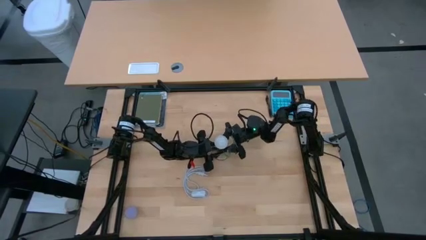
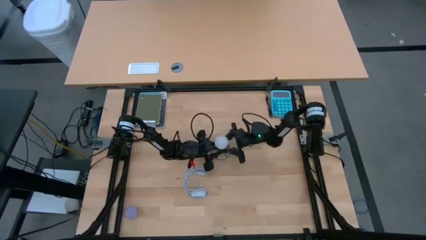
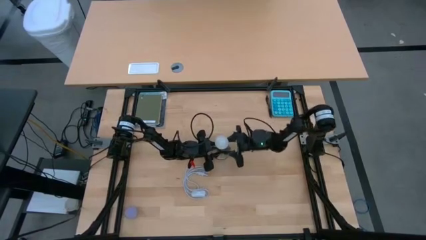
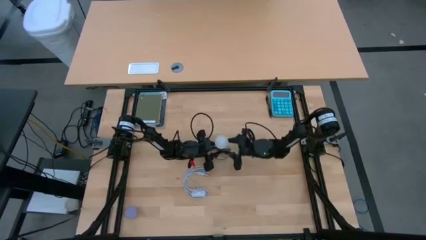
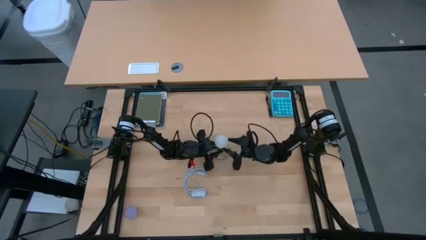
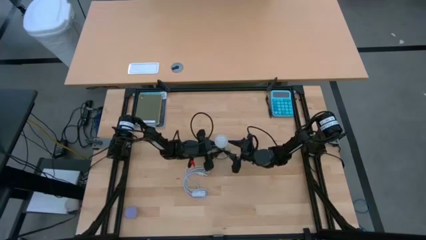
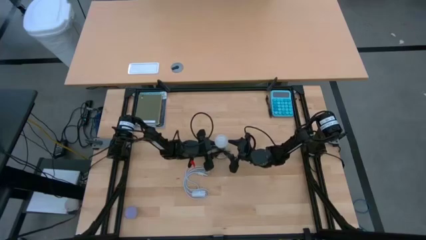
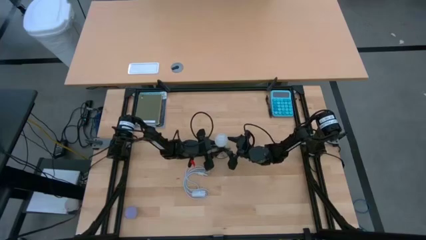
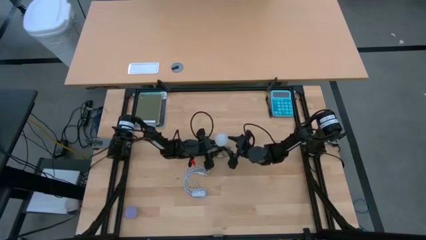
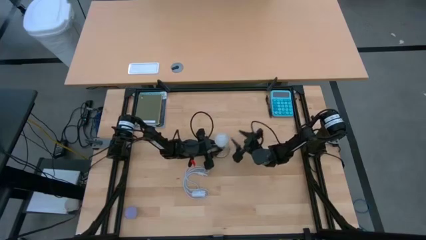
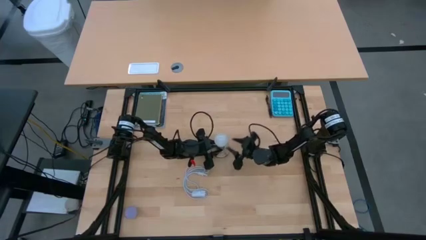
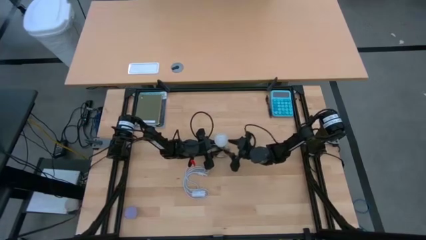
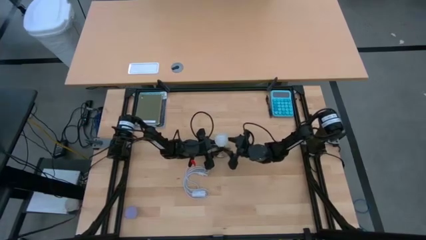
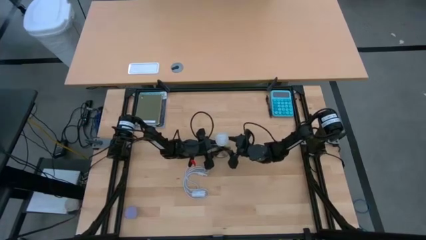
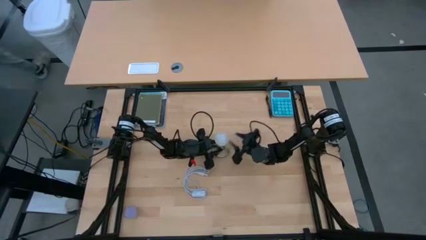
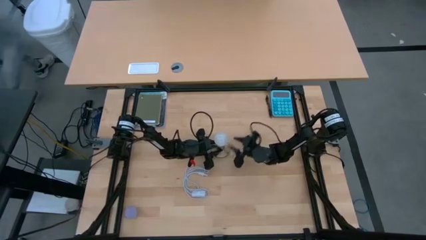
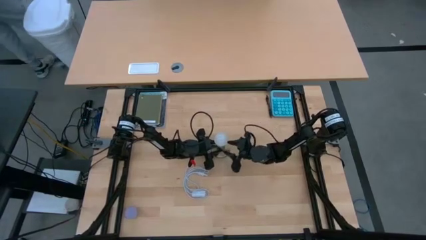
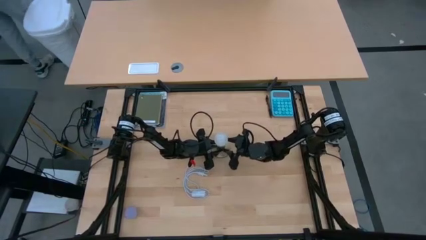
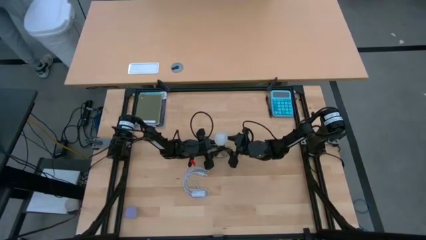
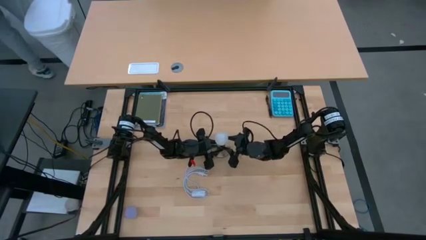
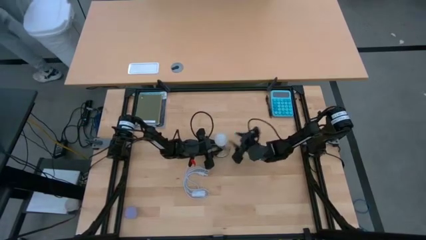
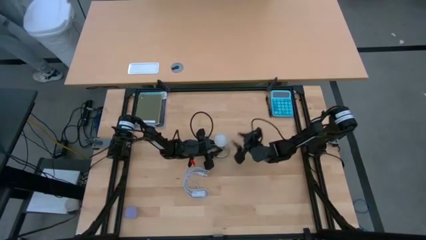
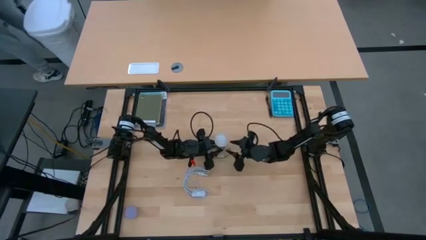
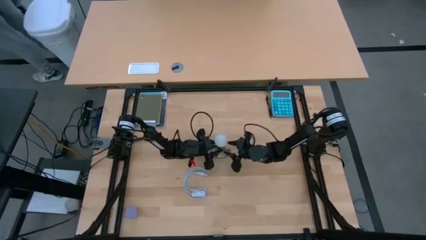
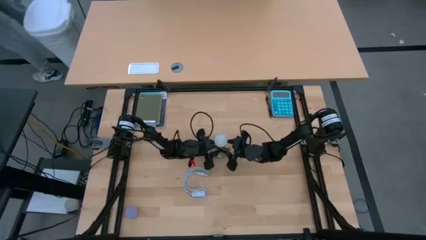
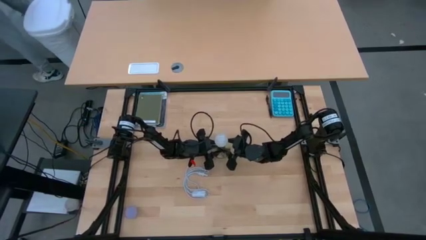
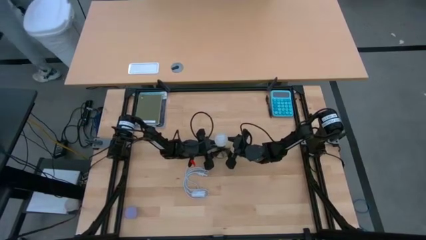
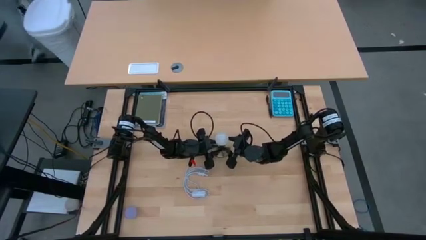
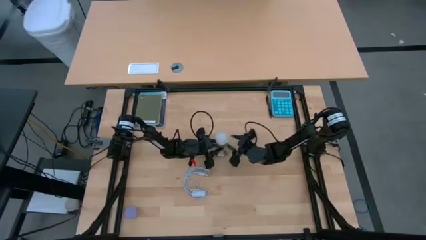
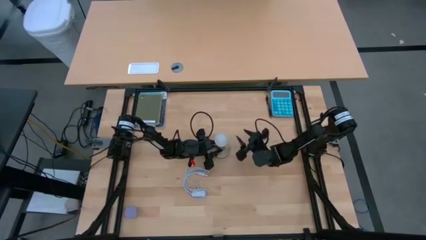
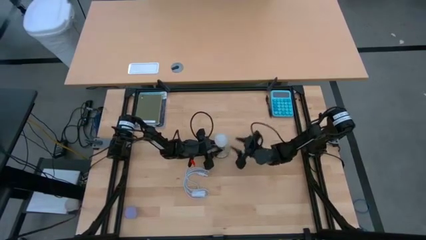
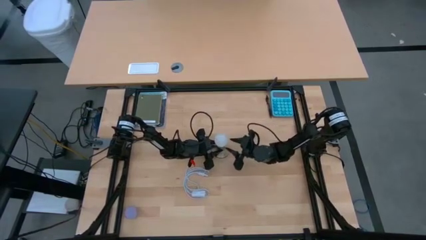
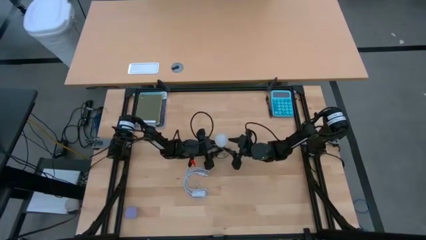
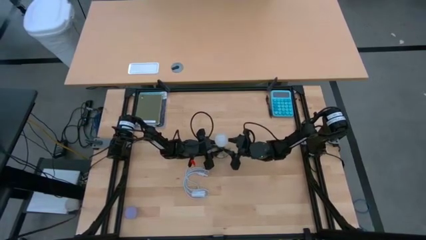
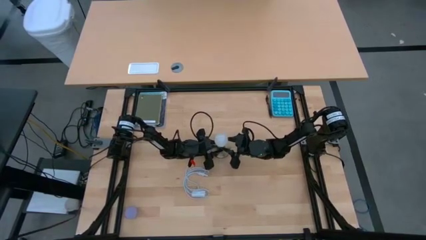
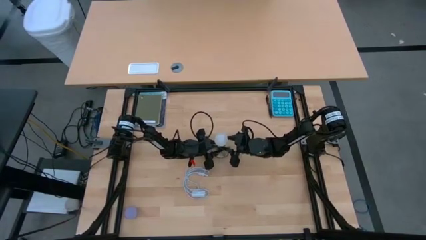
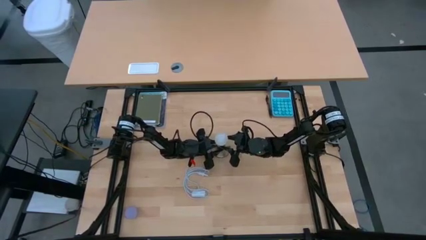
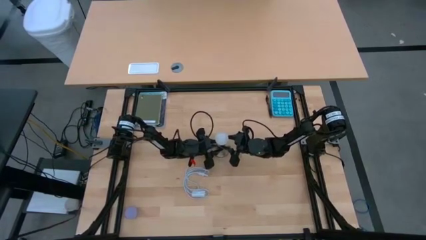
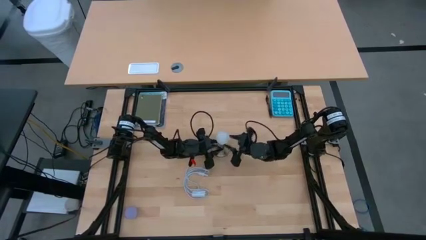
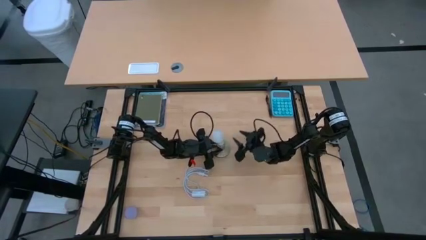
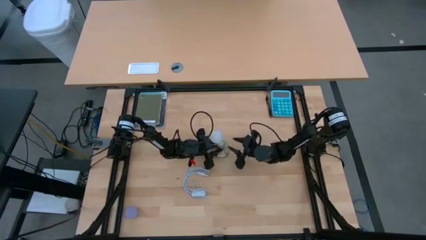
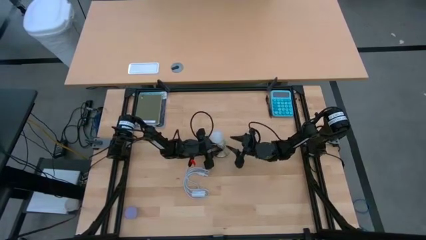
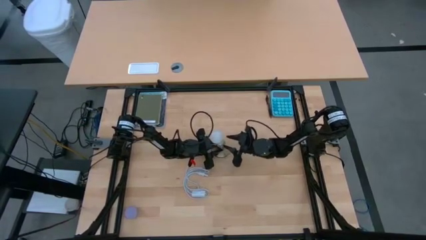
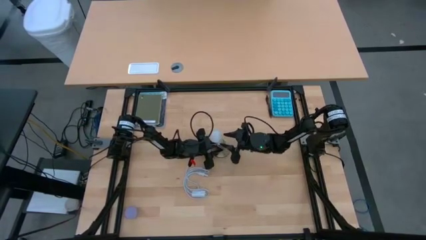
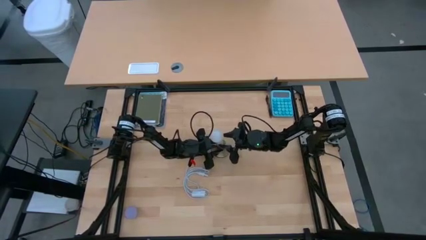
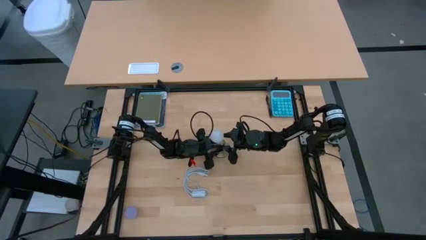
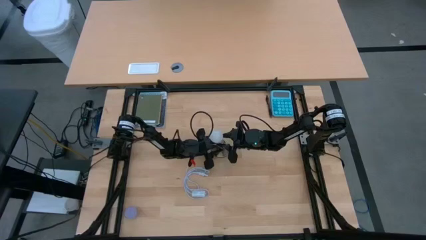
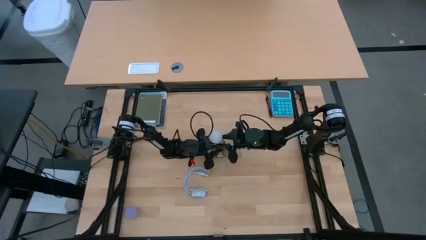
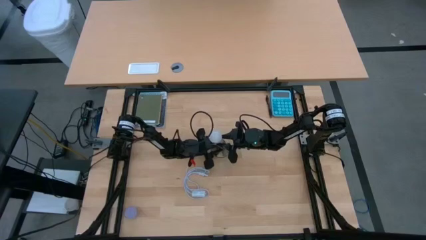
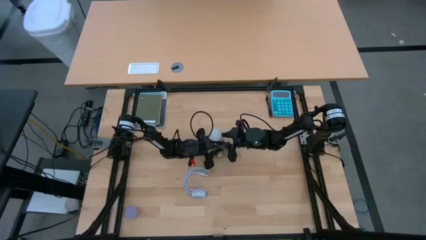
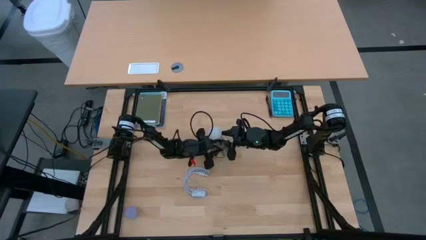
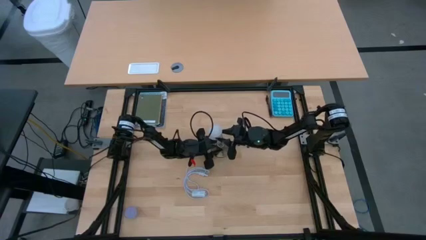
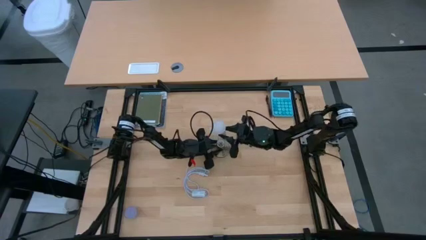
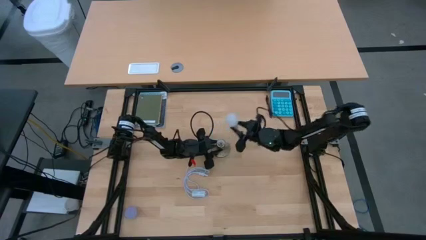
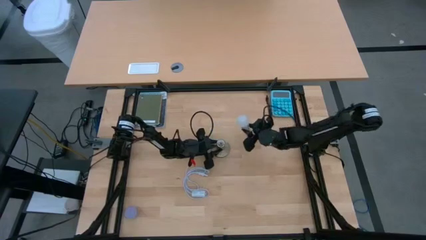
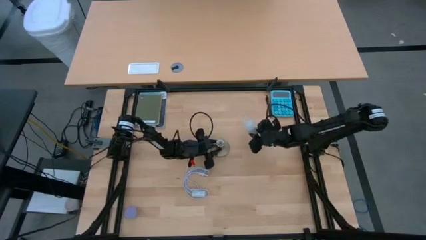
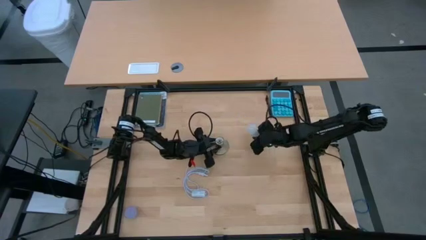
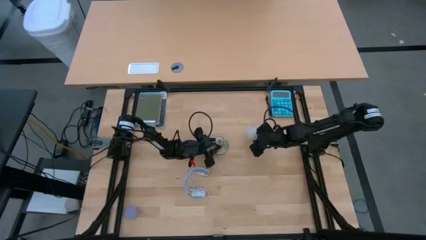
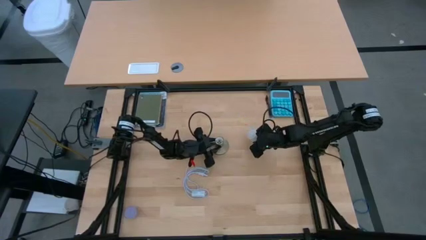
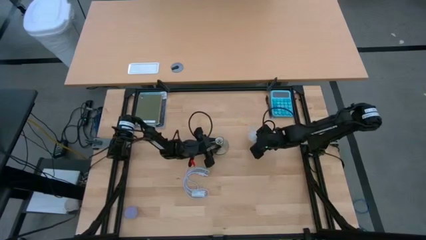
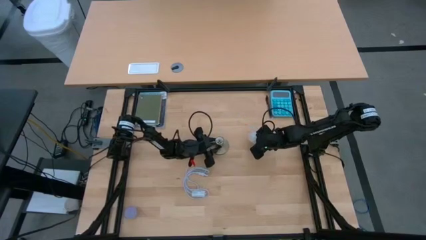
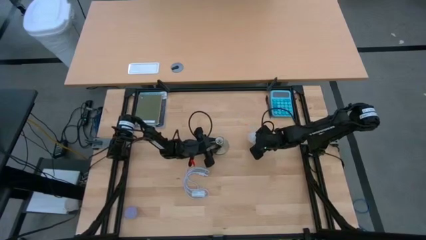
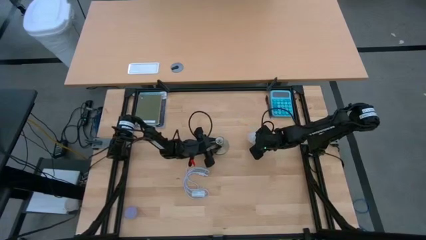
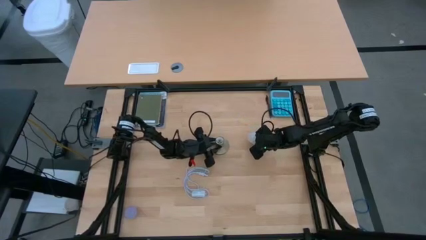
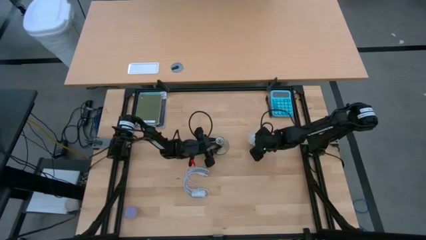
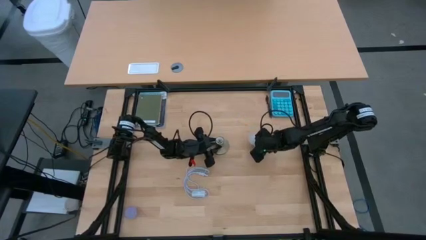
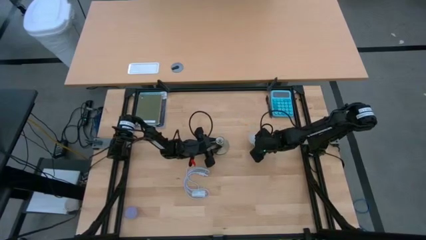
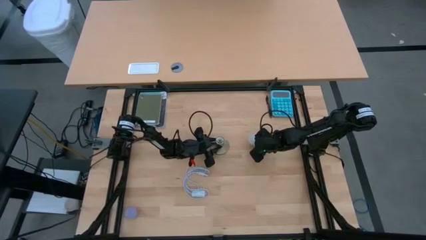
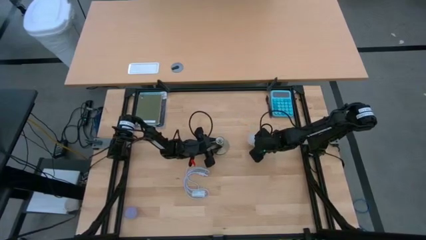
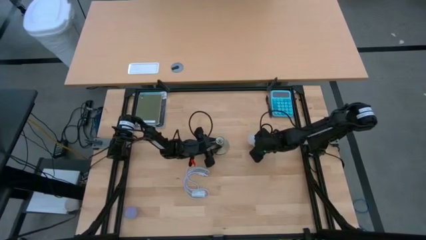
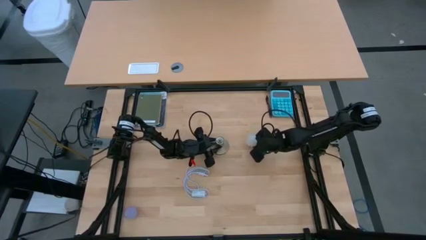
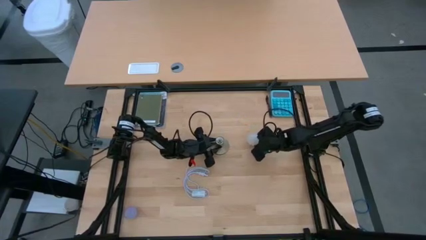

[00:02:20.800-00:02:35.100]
Task: Screw lightbulb
Remove the white lightbulb from the silver lamp
